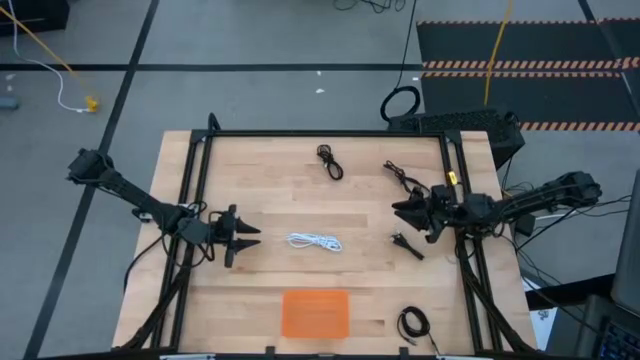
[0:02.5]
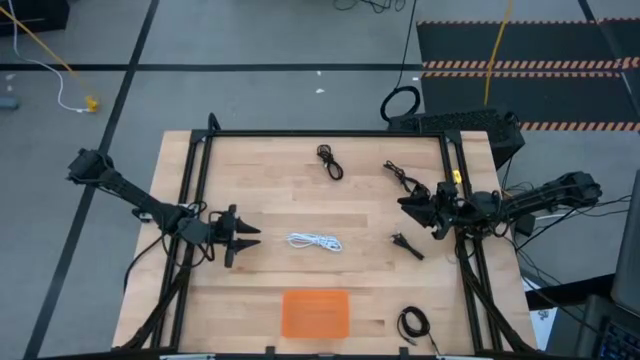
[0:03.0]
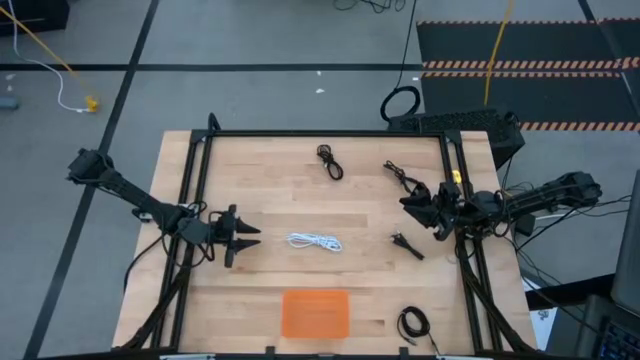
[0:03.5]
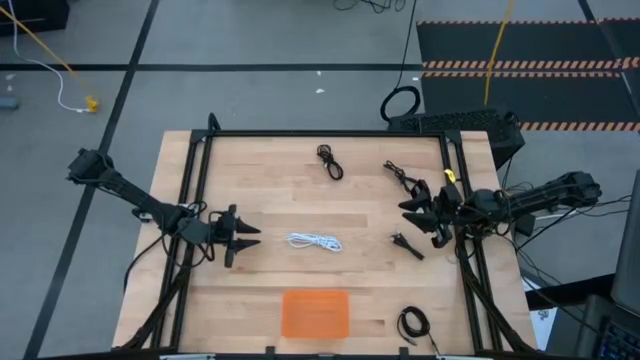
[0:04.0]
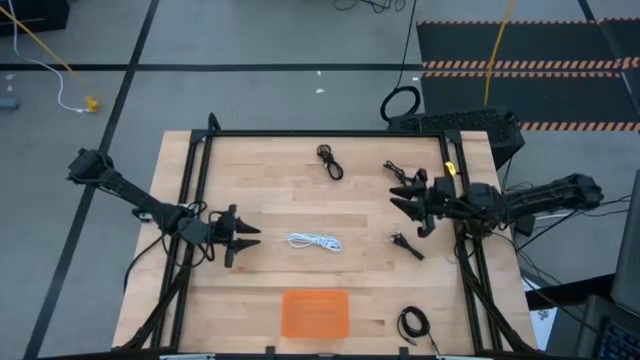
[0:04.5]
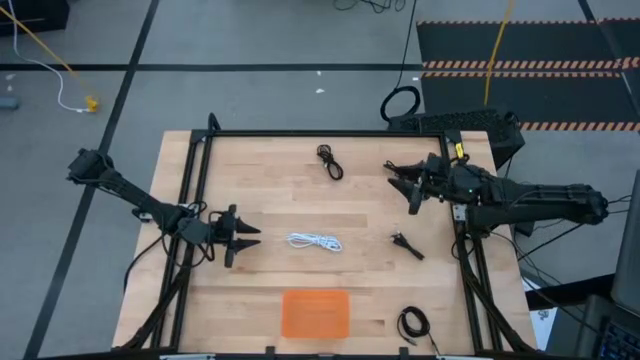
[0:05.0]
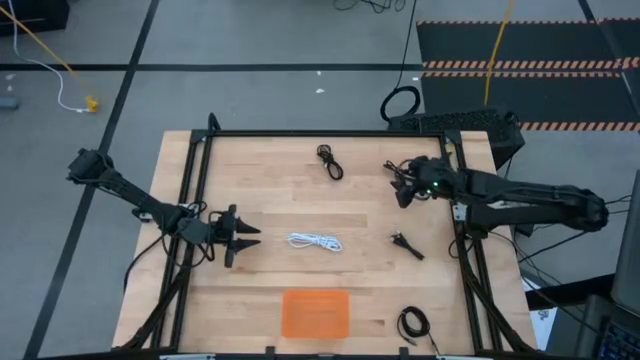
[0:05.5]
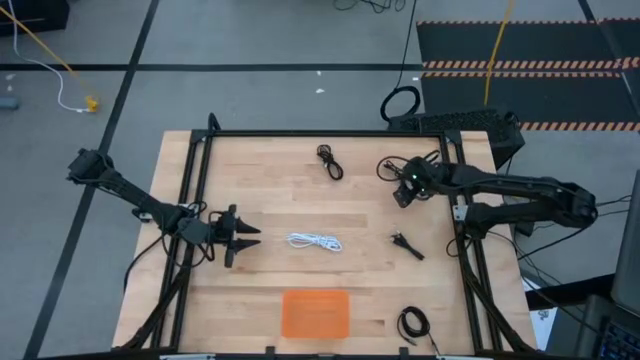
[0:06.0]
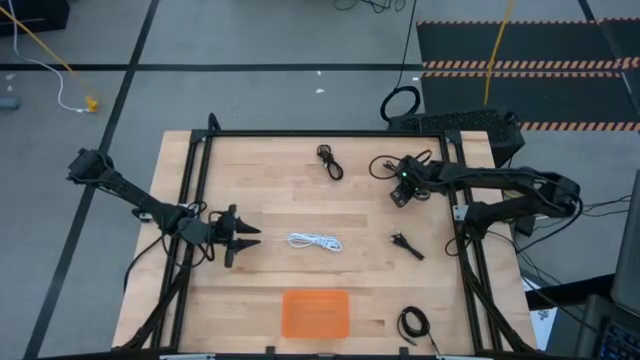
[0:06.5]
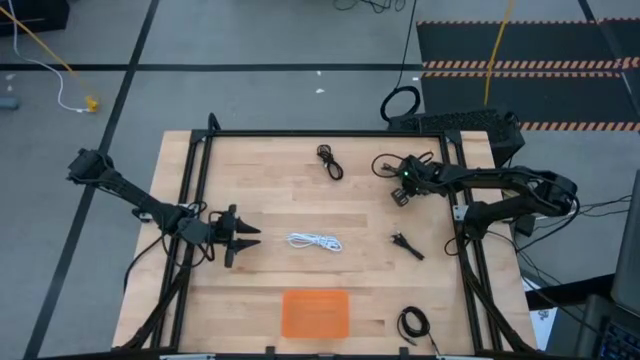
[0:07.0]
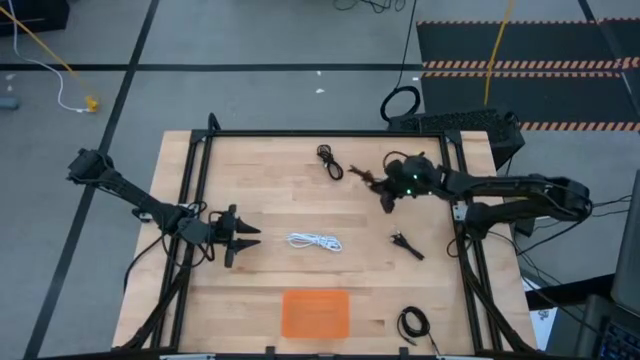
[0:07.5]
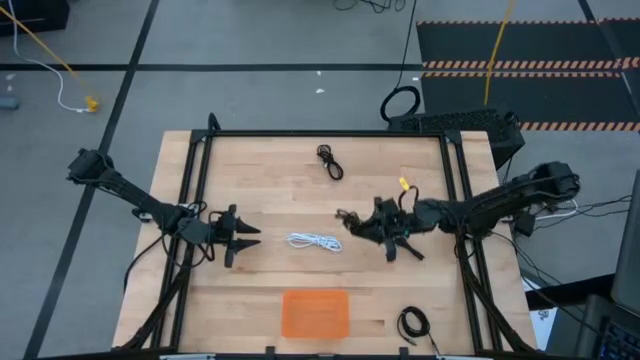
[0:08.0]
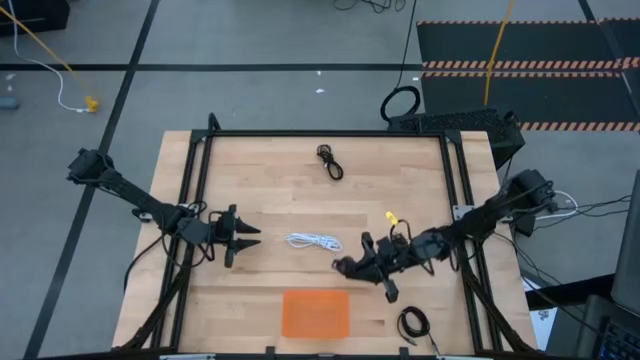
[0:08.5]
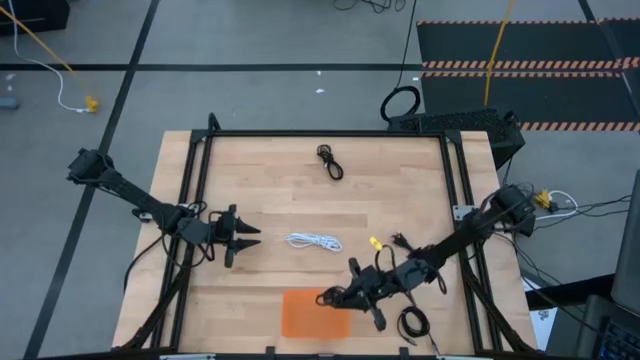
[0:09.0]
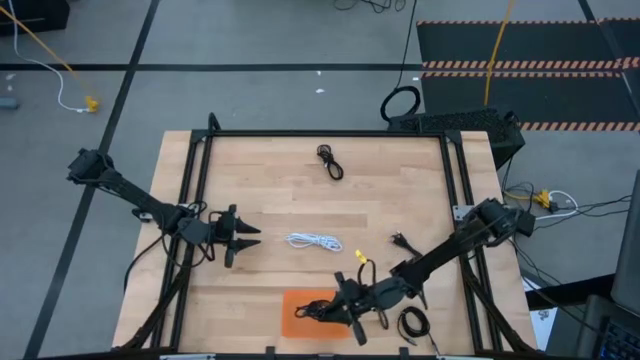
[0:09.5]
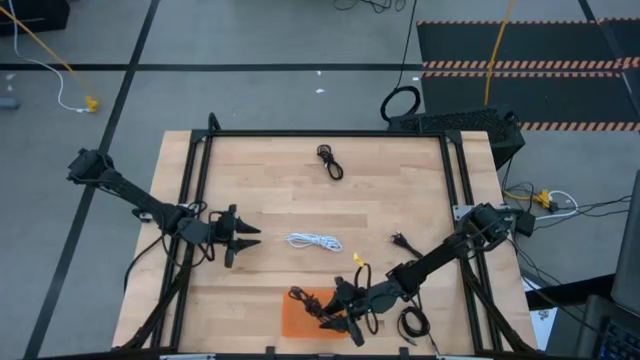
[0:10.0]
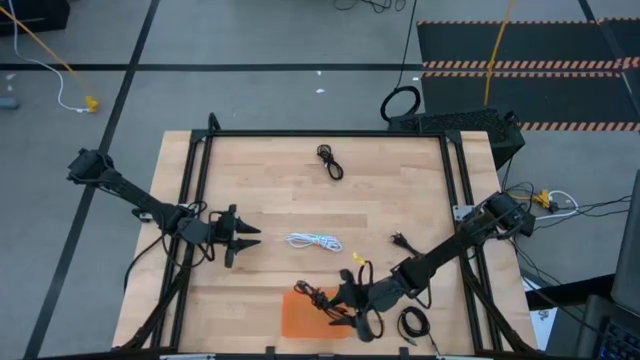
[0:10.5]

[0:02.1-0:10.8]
Task: Pick and place USB-C Cables
Put the top right black charger cable into the orange bin

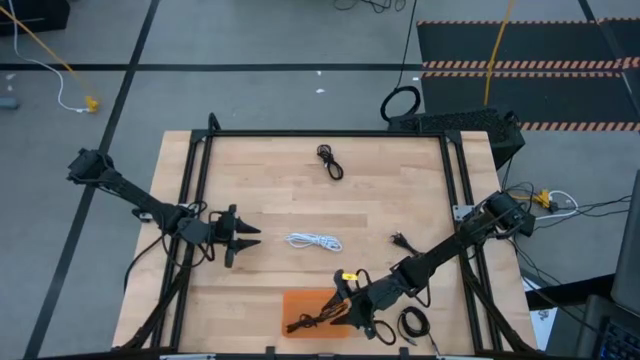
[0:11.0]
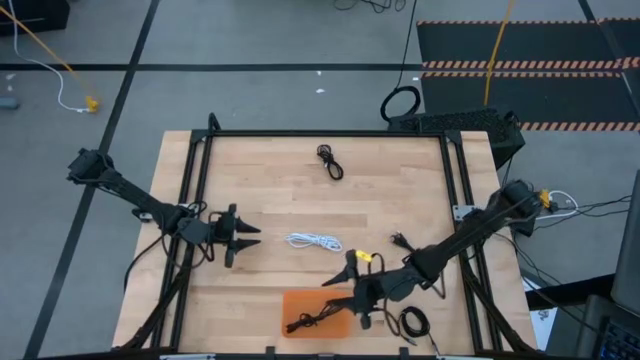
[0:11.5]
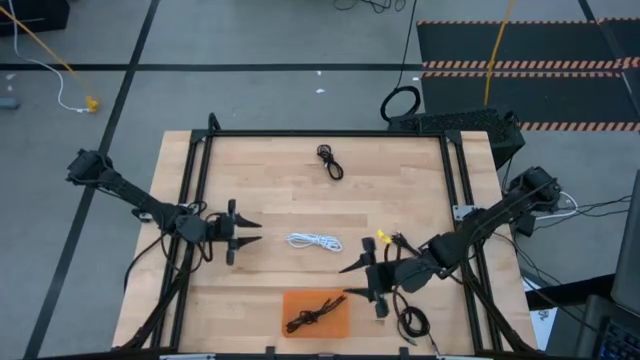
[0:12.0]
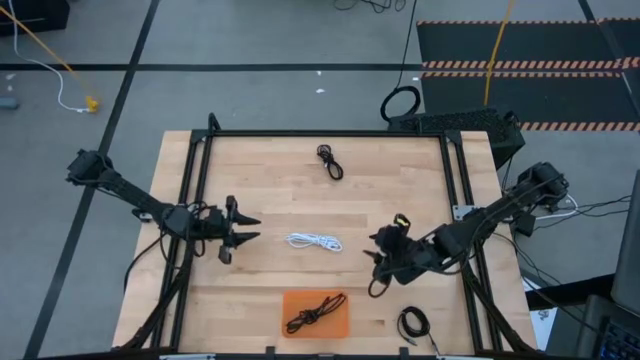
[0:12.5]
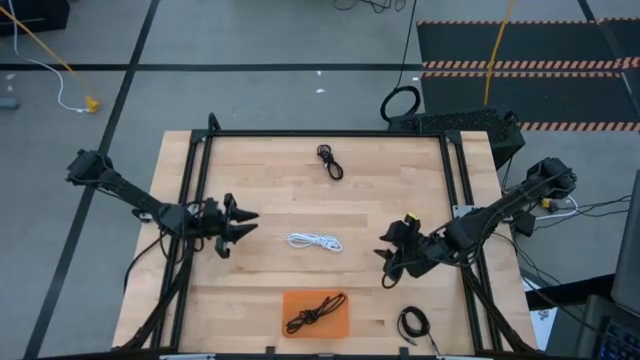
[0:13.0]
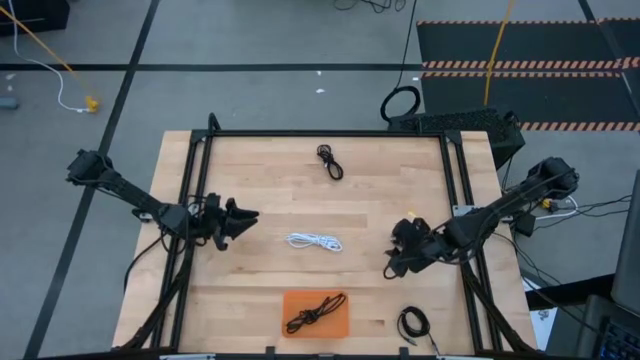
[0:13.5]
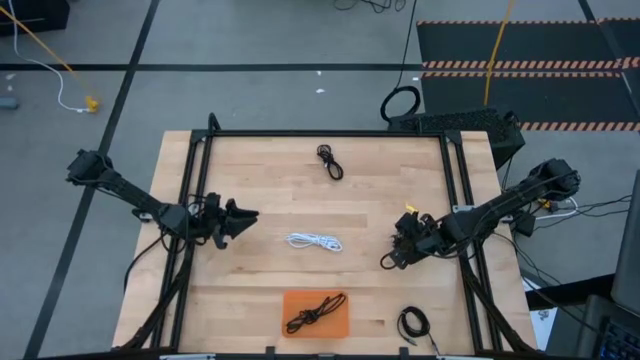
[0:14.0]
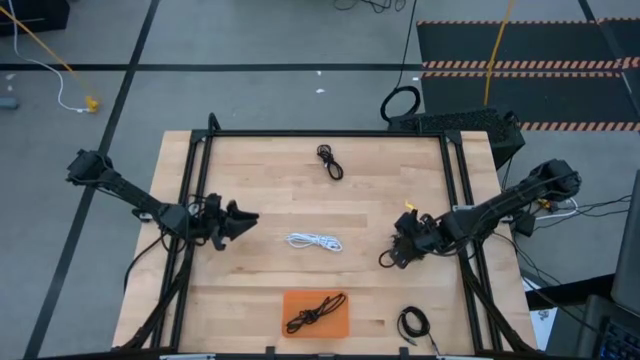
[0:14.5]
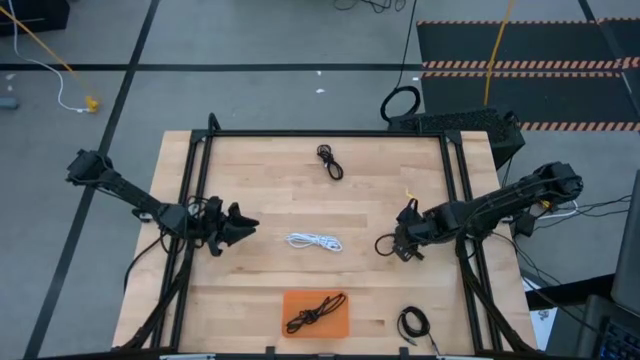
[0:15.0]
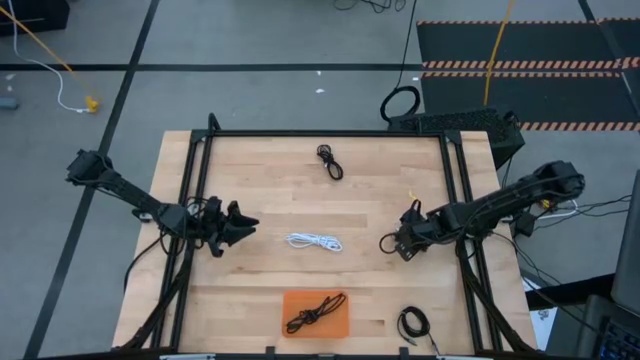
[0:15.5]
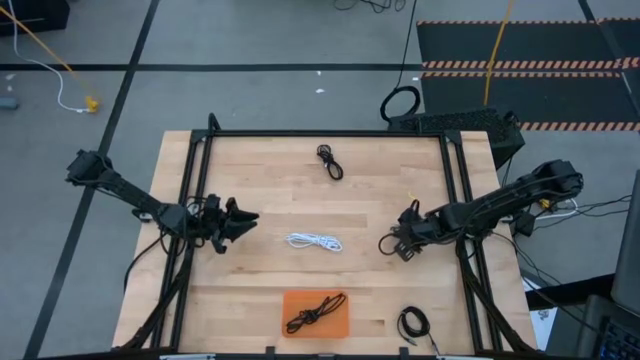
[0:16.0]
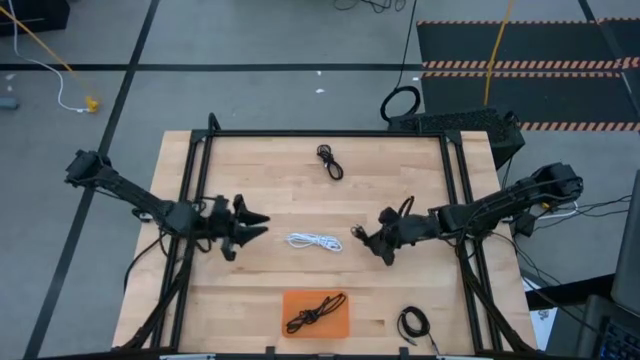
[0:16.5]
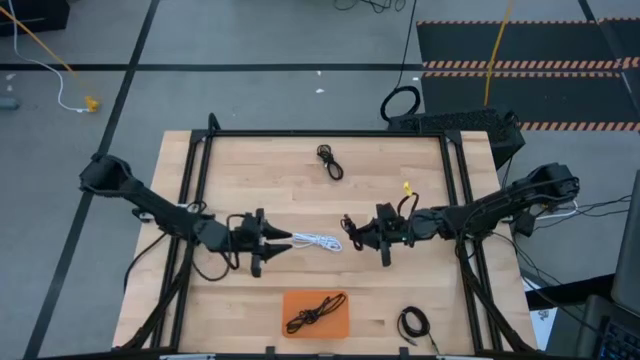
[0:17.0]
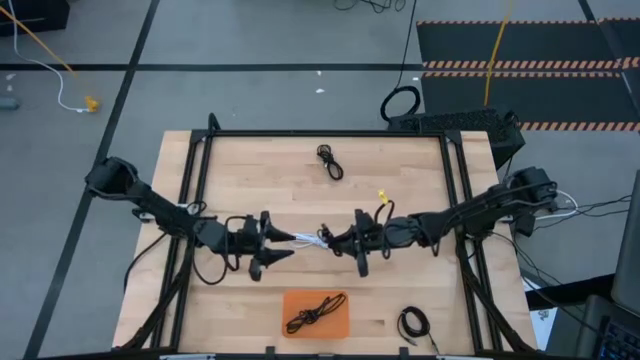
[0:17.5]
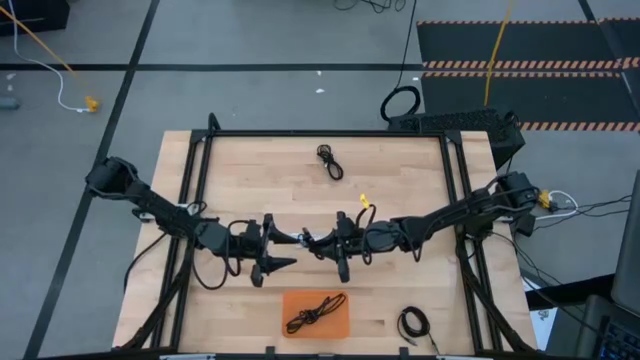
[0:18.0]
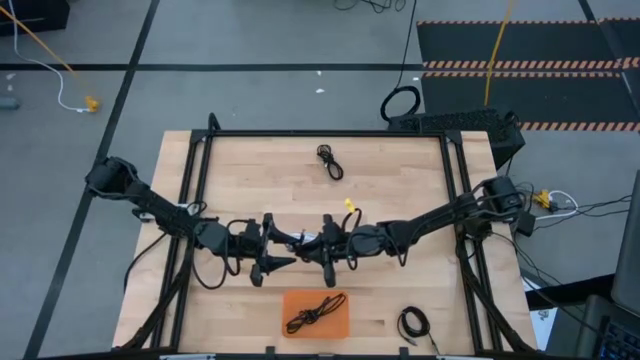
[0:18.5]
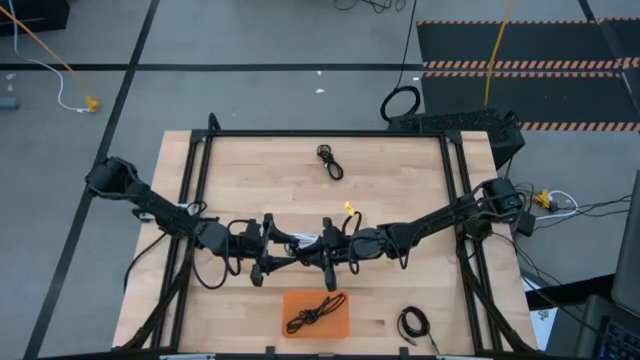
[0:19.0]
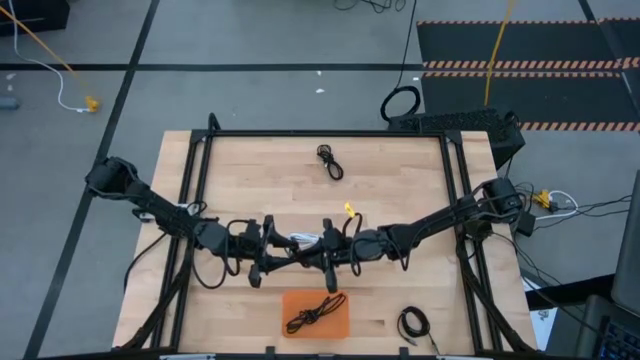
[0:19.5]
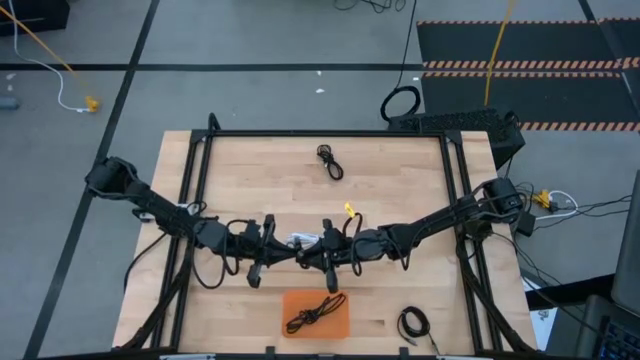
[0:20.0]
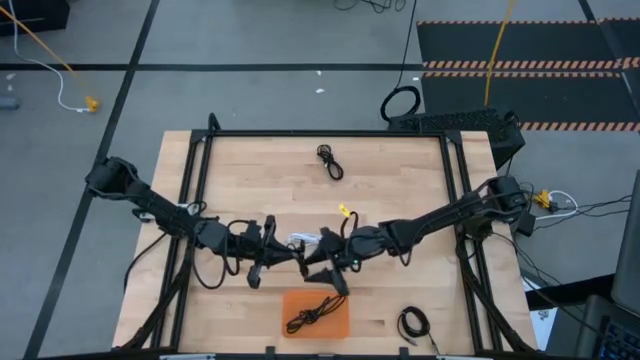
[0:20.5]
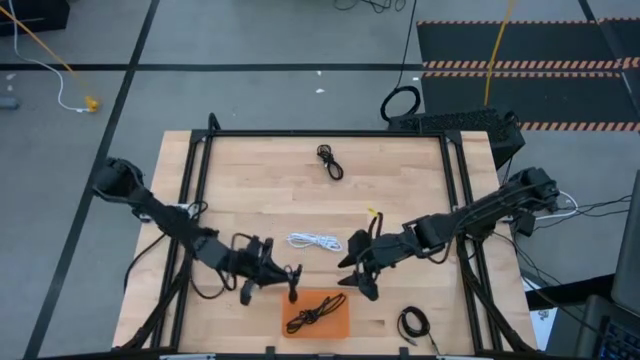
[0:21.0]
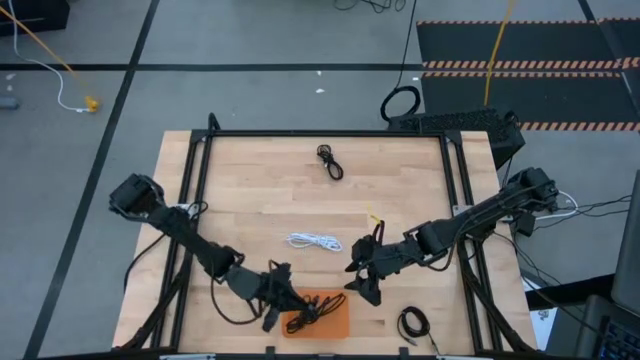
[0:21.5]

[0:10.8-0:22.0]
Put the middle right black charger cable into the orange bin

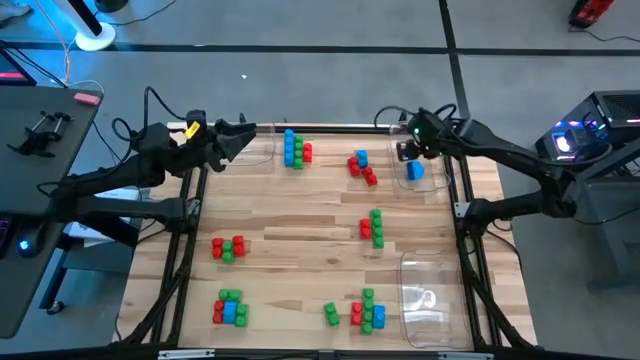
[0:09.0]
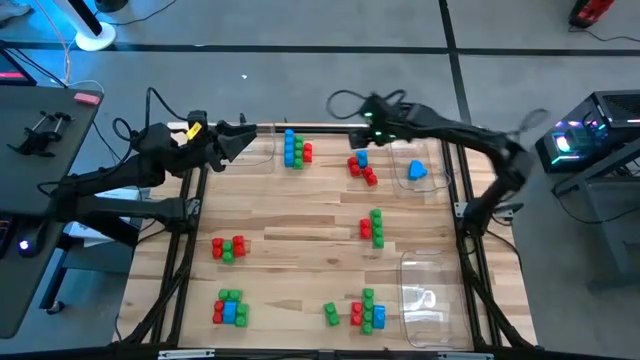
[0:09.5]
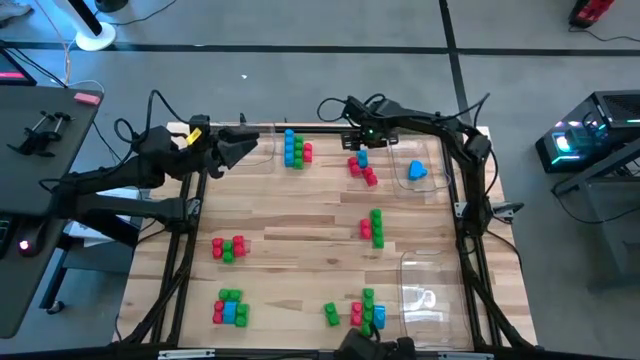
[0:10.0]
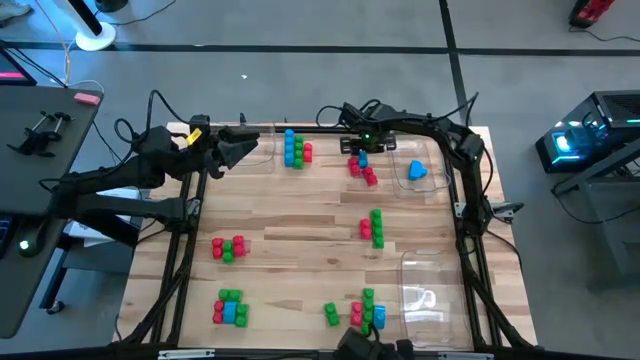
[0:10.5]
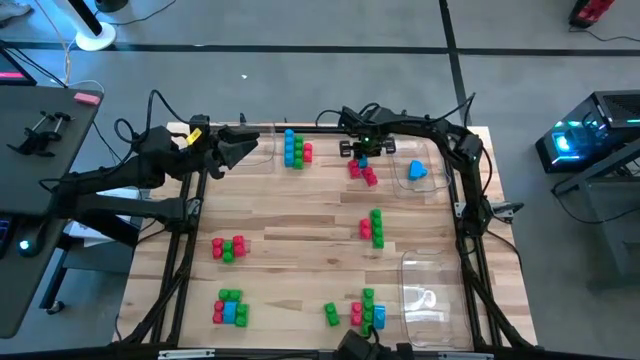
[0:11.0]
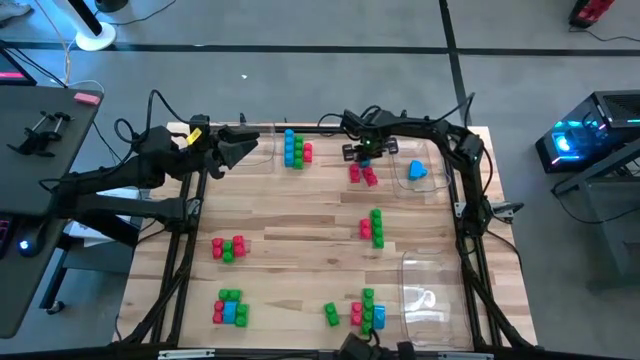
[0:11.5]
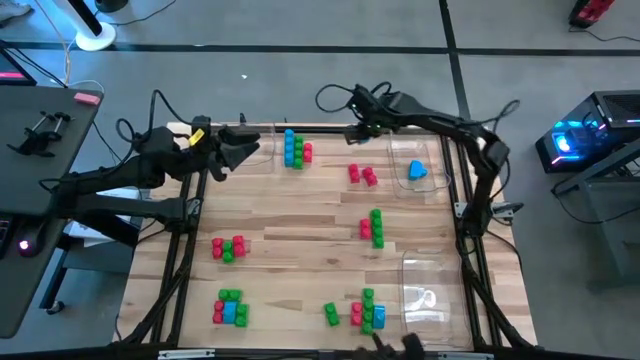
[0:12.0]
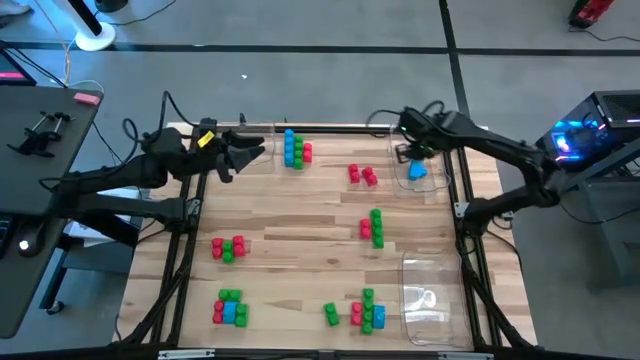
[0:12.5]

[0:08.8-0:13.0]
Task: Sort blocks
Put the blue game piece into the top right transparent bin
